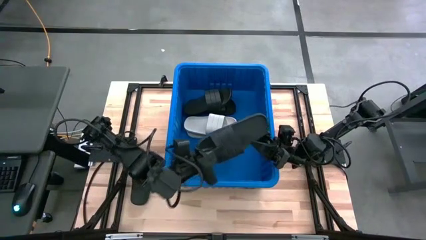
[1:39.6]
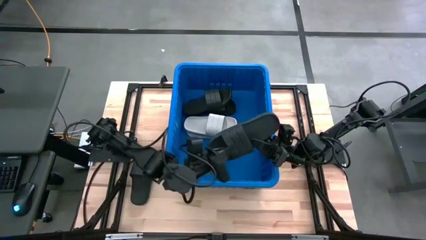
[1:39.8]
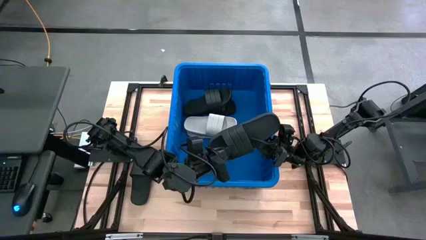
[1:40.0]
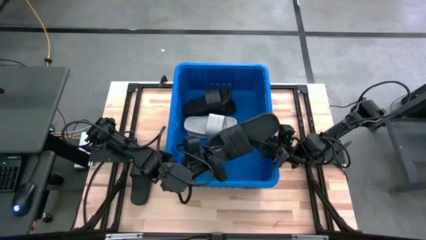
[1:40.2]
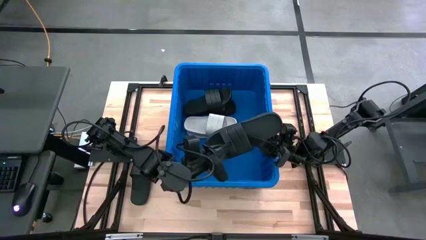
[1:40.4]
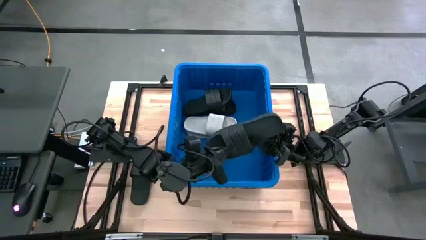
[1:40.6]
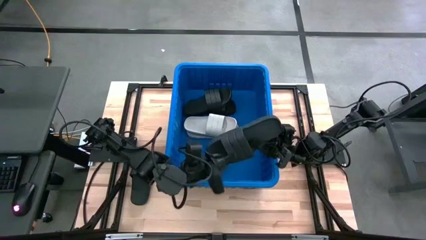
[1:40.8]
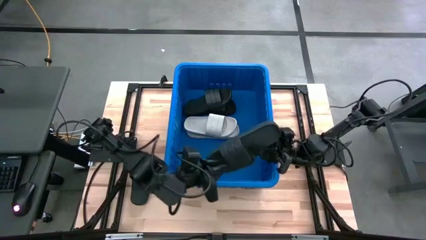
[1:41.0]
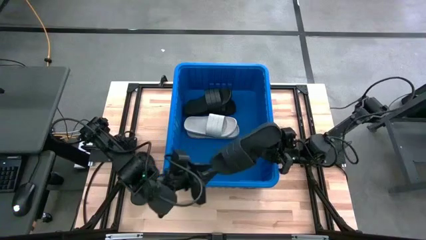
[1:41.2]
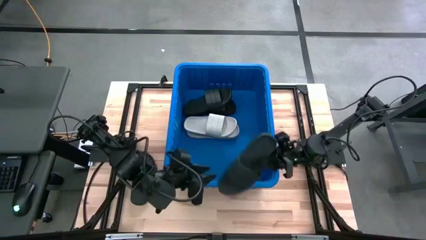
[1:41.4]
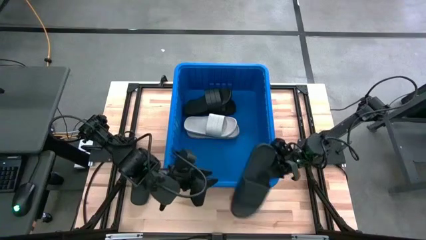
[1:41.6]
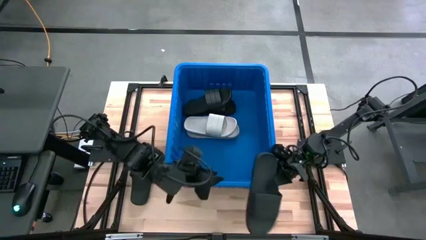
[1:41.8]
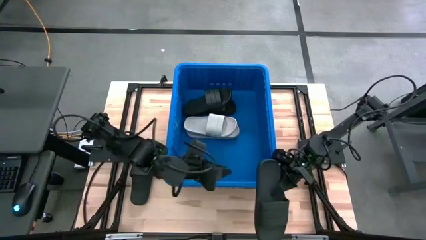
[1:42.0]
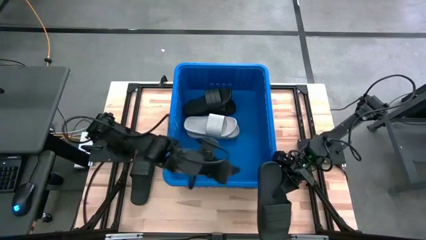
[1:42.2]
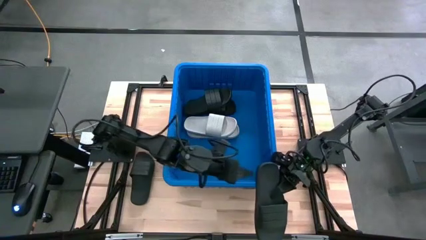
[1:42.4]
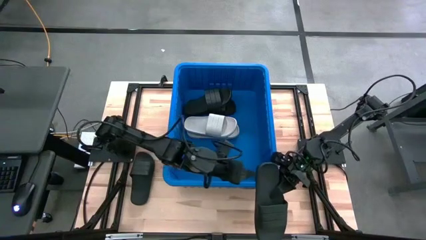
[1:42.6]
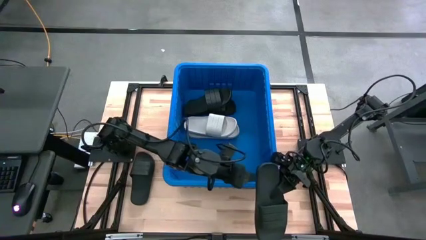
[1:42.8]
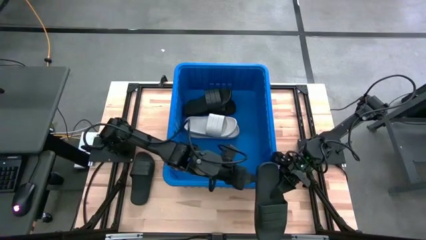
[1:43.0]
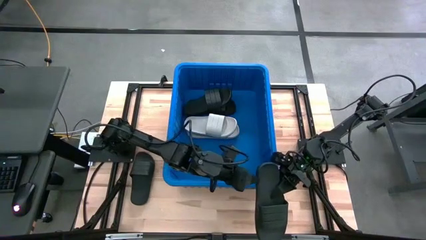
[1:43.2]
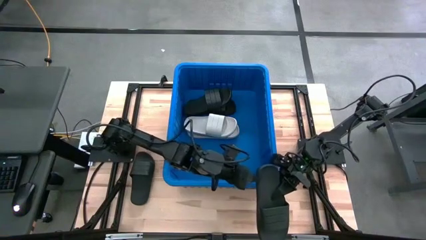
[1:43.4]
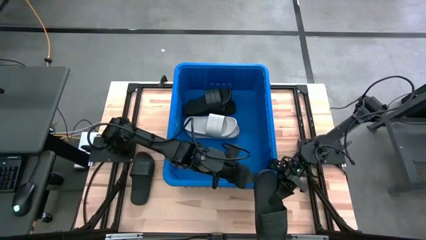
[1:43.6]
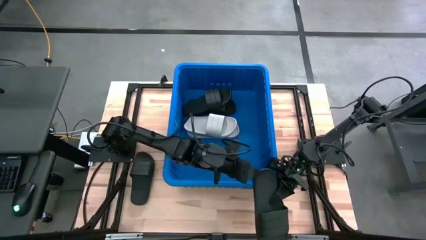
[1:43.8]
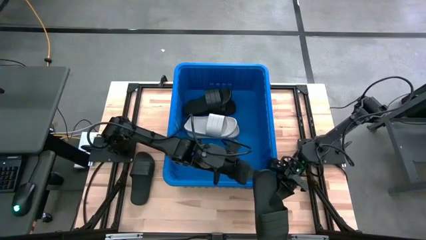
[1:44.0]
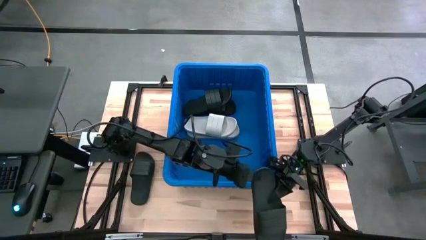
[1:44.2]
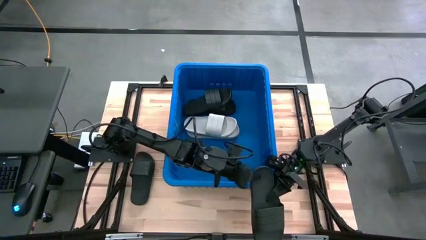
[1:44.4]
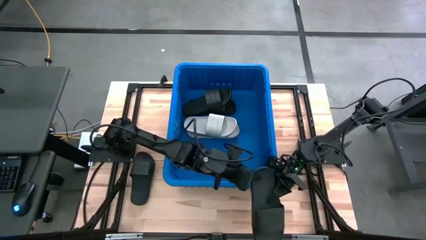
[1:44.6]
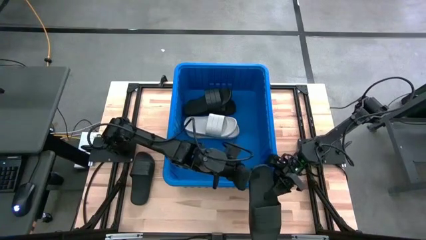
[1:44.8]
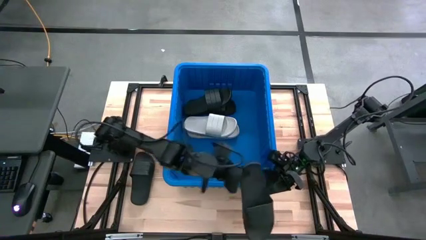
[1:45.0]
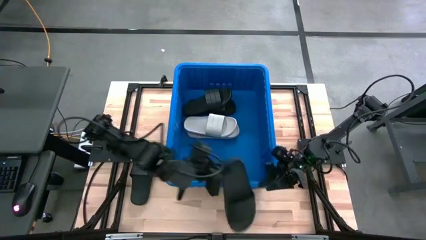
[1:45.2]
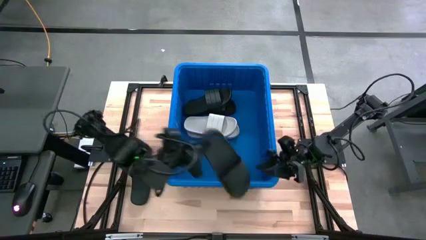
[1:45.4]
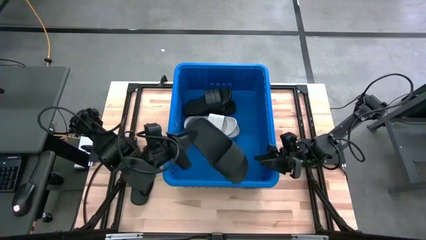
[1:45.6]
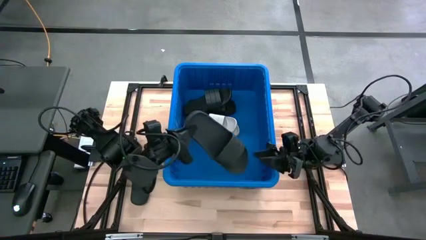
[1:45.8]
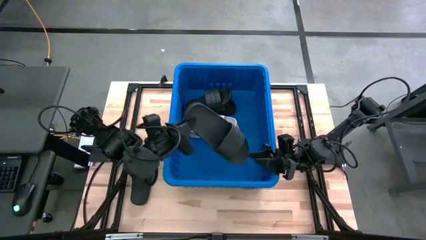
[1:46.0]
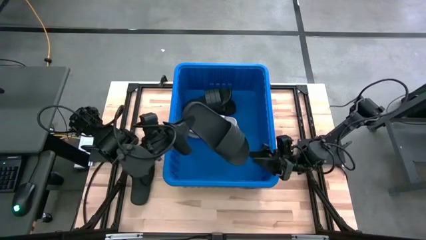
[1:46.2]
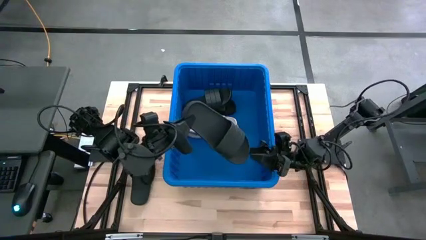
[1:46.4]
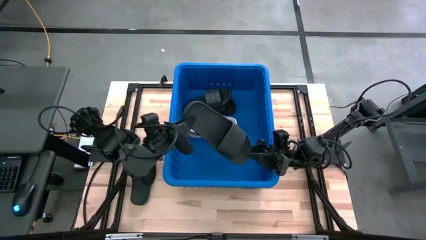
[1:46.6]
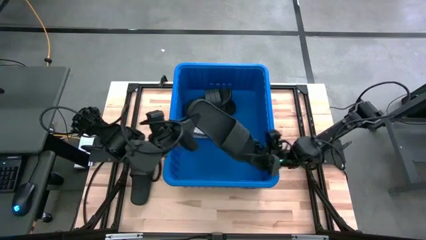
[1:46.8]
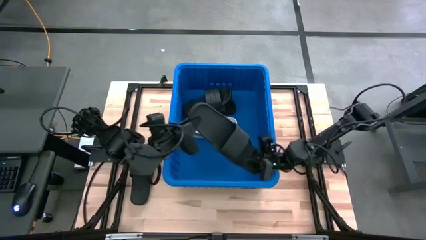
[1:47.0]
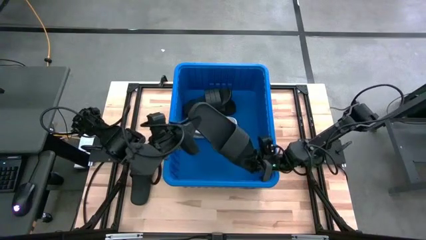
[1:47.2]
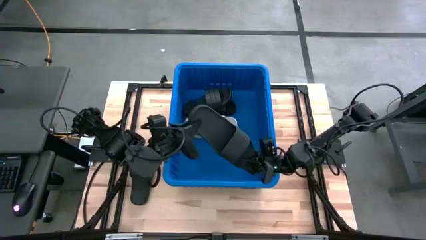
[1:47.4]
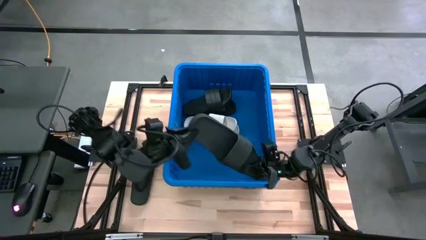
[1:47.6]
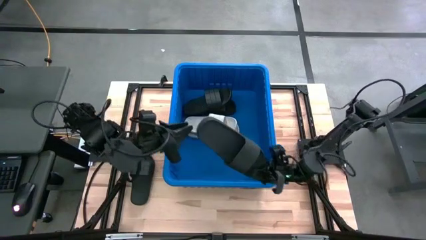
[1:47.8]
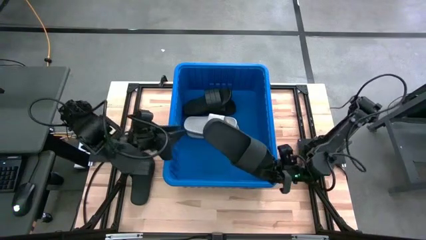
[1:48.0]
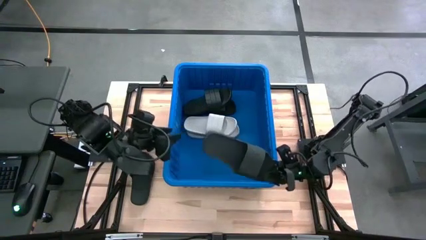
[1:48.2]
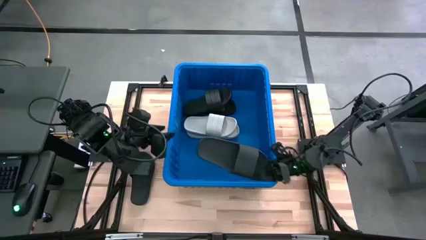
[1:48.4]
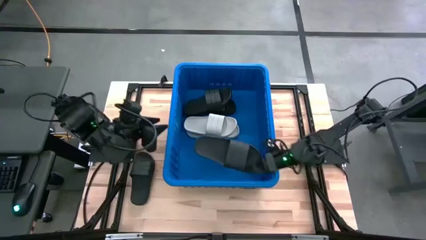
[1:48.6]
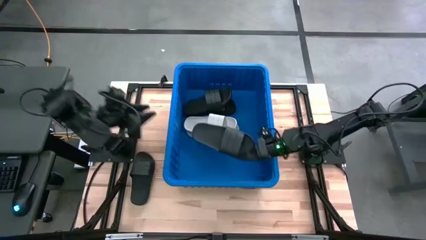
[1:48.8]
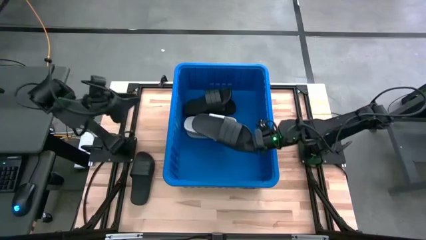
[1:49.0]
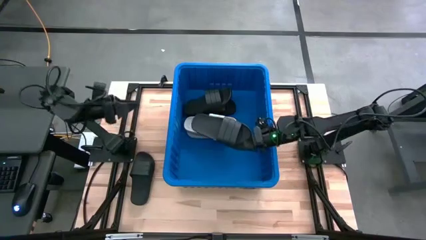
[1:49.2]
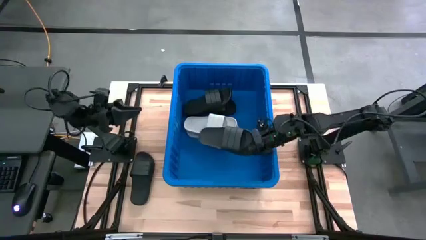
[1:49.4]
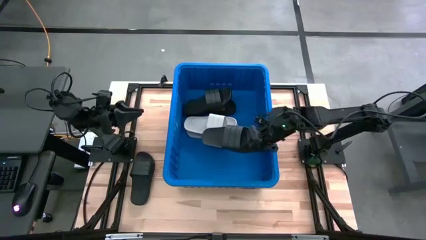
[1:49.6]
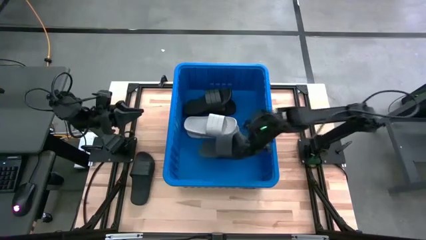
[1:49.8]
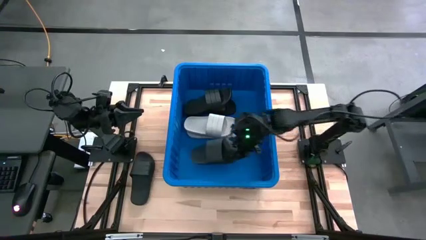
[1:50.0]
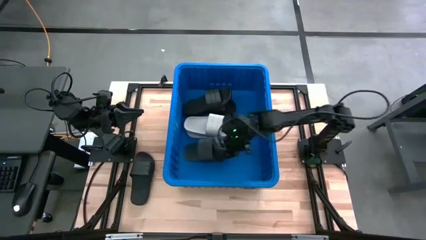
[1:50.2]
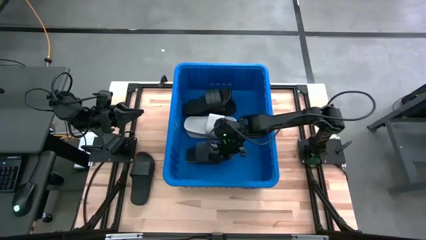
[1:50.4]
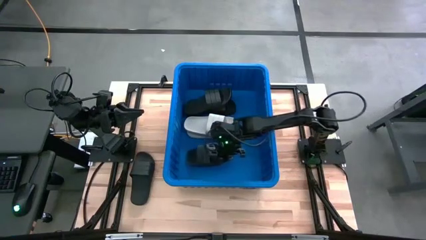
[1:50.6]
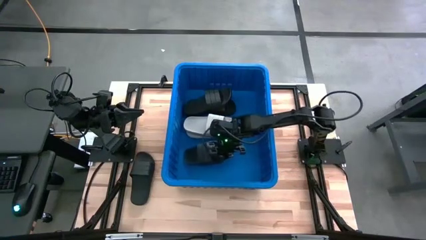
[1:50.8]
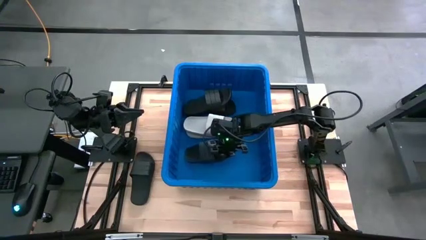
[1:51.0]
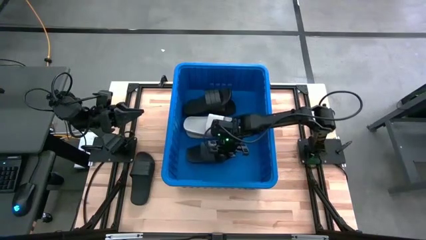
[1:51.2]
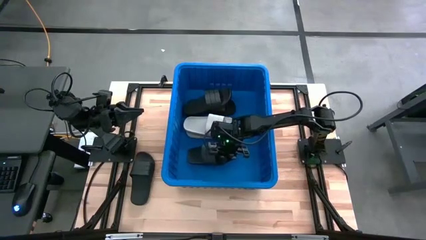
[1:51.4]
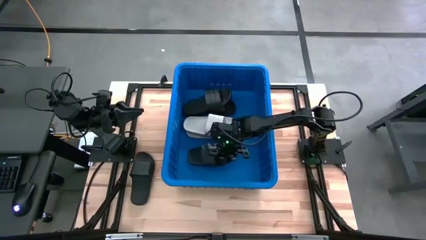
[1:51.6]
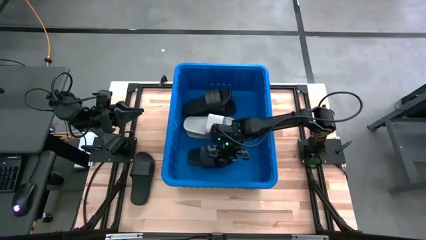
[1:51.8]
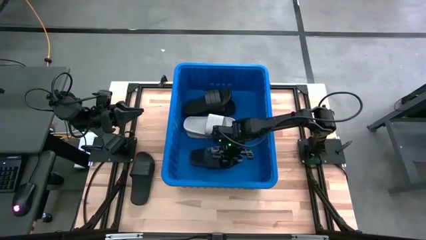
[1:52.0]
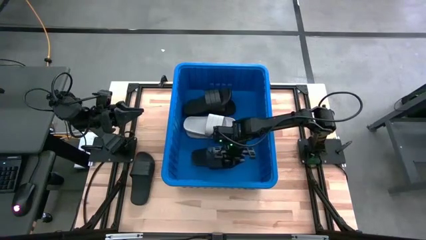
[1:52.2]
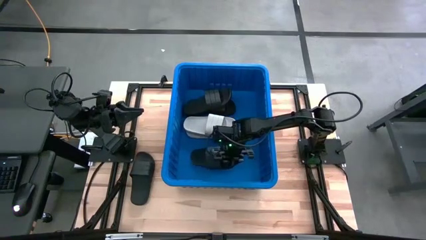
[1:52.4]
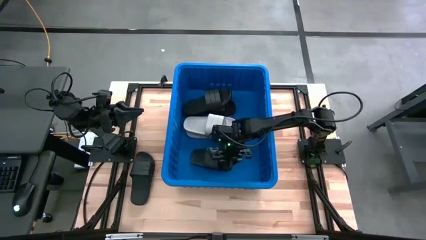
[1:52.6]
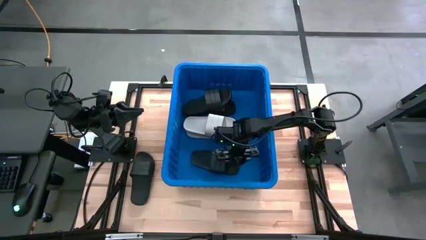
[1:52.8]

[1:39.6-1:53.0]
Task: Pick and place slides into bin
Put the bottom black slipper into the blue bin
